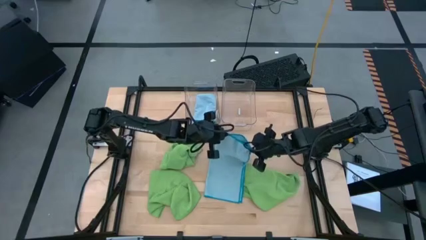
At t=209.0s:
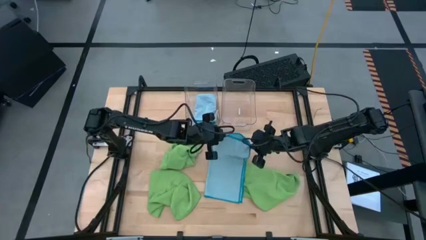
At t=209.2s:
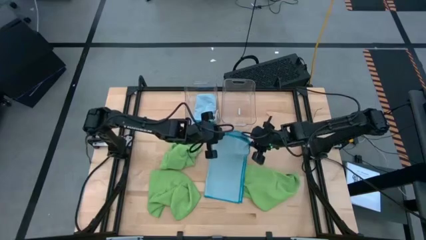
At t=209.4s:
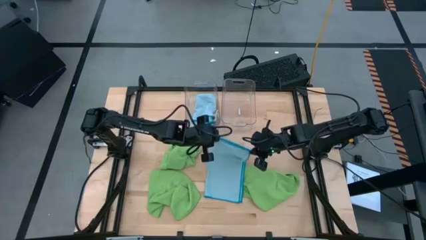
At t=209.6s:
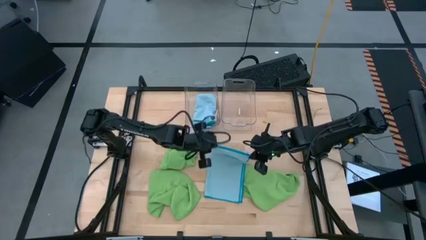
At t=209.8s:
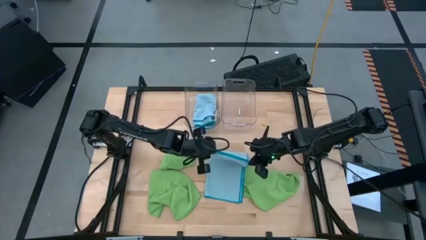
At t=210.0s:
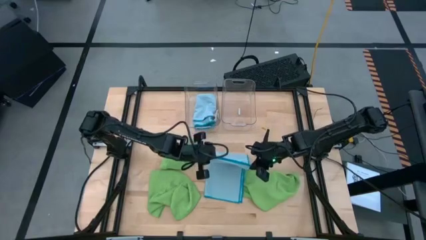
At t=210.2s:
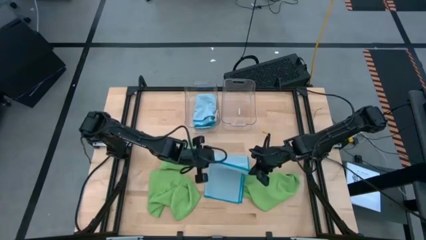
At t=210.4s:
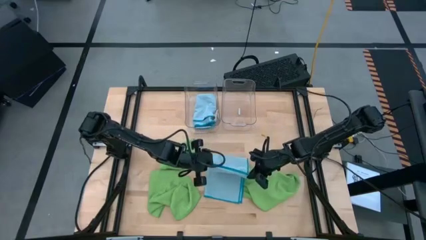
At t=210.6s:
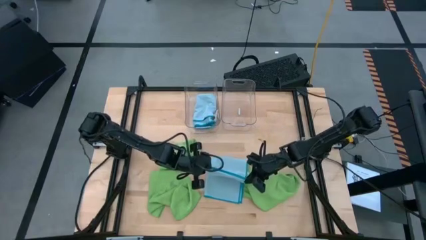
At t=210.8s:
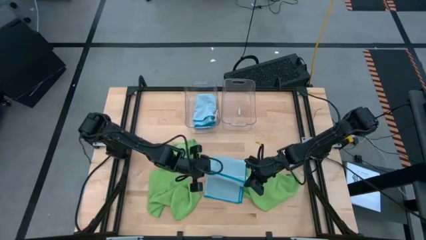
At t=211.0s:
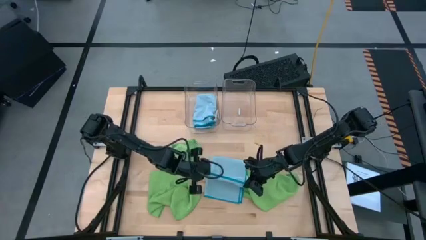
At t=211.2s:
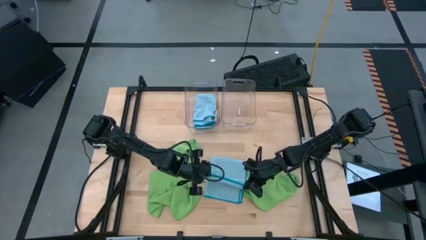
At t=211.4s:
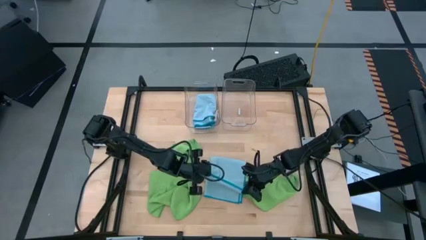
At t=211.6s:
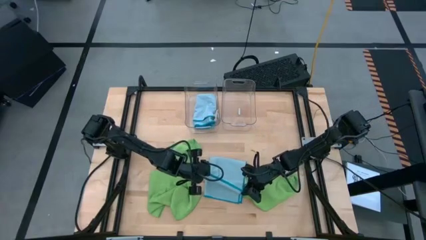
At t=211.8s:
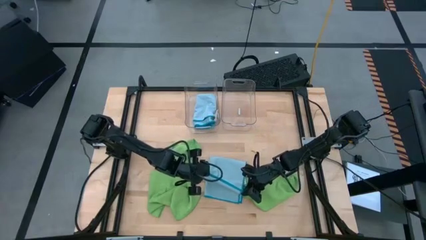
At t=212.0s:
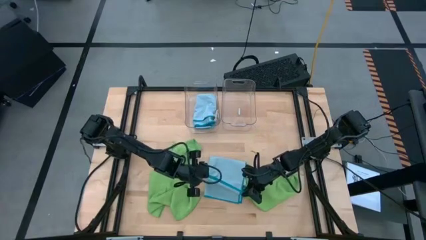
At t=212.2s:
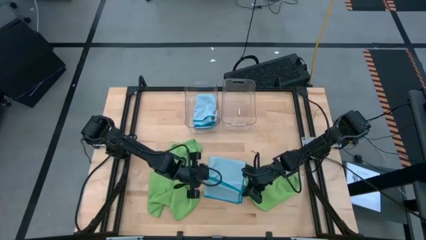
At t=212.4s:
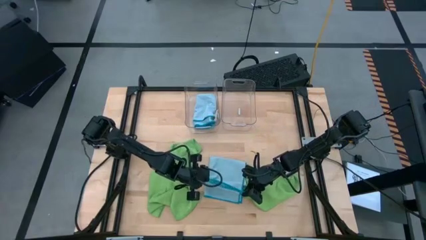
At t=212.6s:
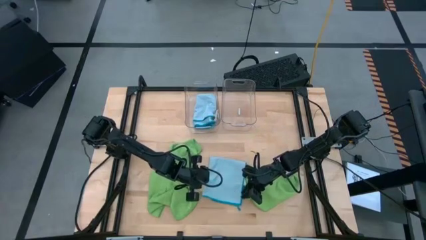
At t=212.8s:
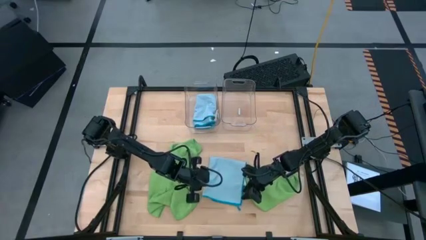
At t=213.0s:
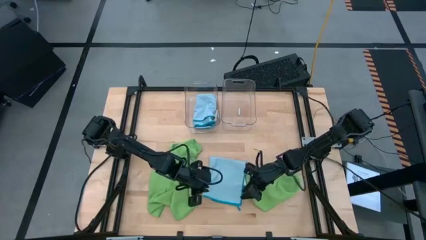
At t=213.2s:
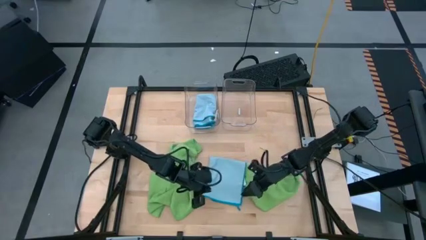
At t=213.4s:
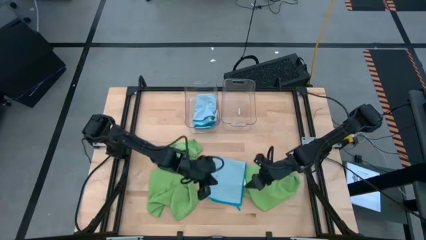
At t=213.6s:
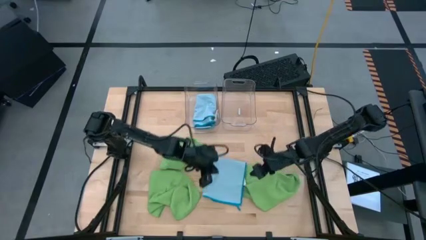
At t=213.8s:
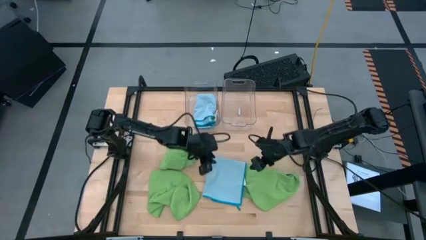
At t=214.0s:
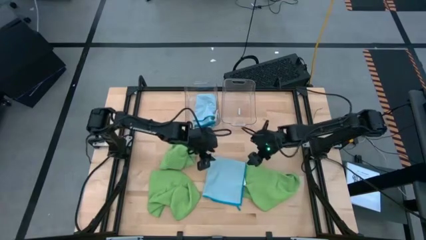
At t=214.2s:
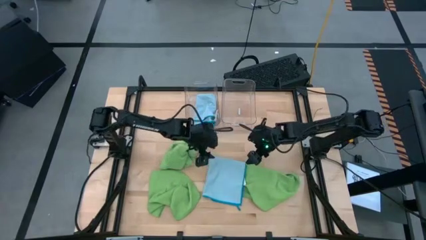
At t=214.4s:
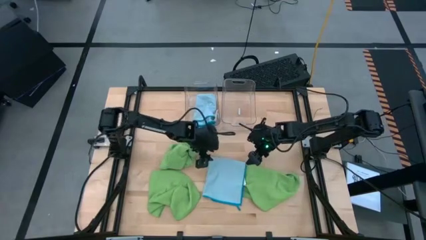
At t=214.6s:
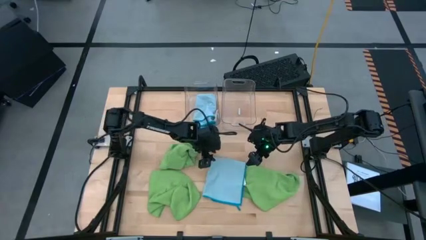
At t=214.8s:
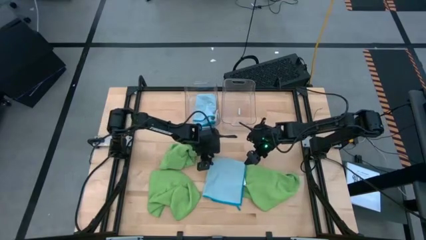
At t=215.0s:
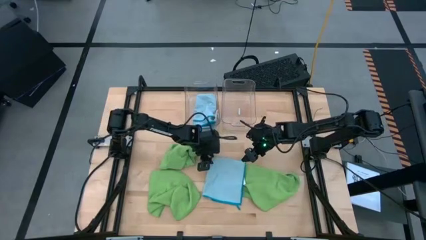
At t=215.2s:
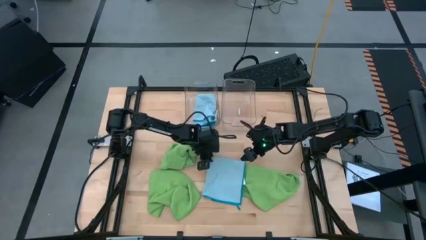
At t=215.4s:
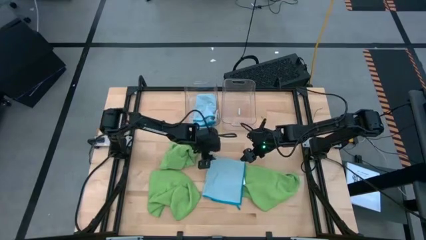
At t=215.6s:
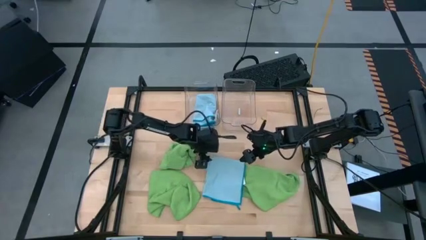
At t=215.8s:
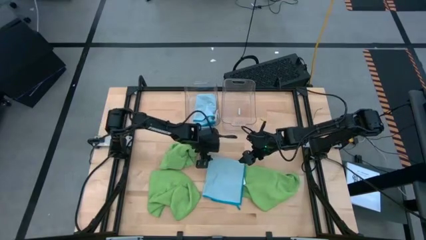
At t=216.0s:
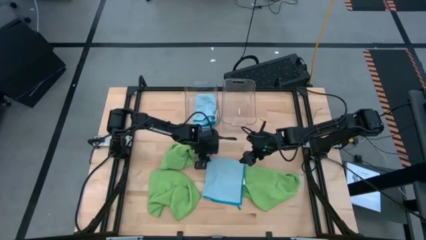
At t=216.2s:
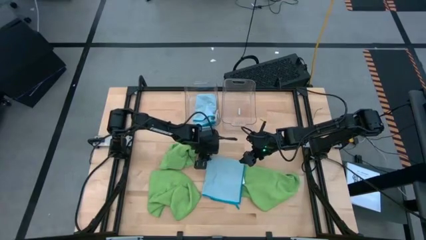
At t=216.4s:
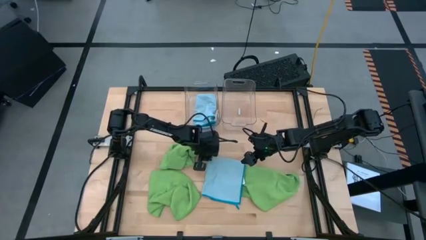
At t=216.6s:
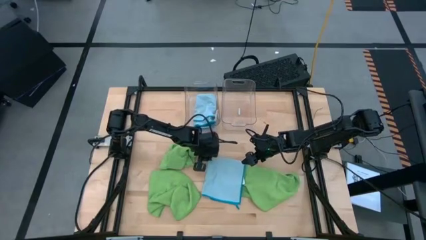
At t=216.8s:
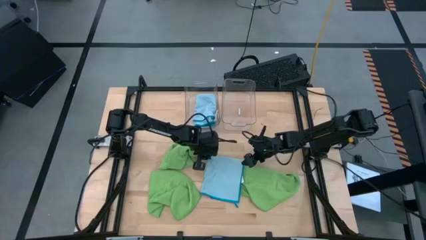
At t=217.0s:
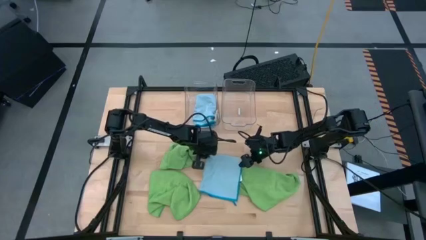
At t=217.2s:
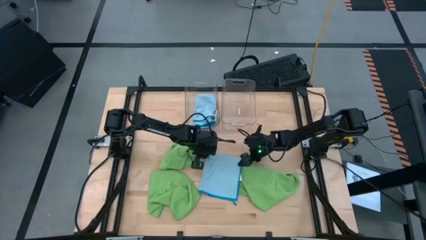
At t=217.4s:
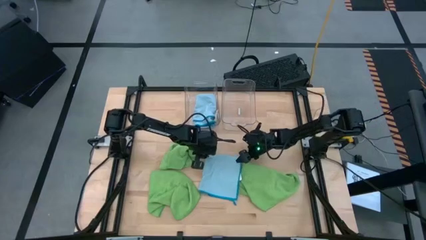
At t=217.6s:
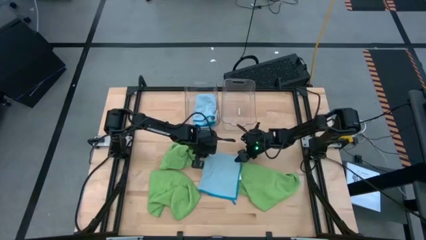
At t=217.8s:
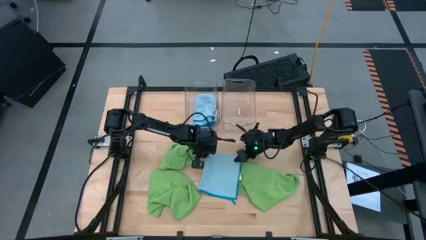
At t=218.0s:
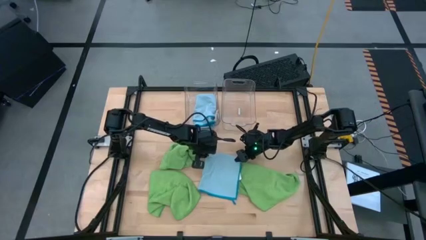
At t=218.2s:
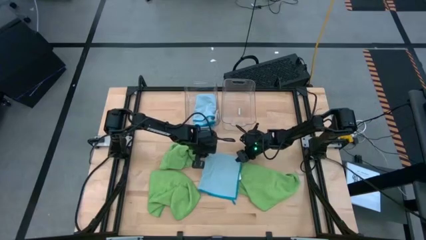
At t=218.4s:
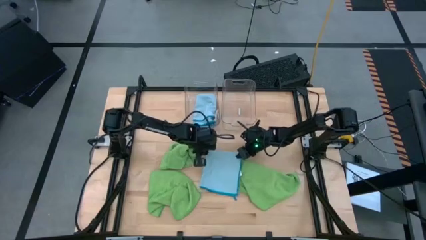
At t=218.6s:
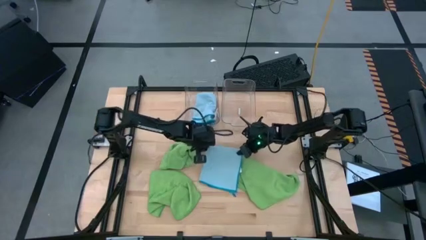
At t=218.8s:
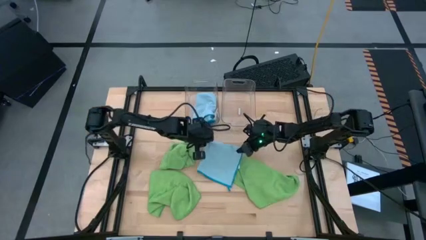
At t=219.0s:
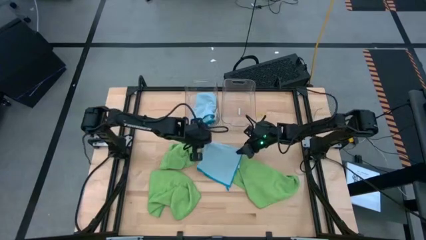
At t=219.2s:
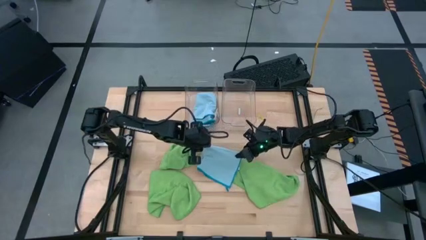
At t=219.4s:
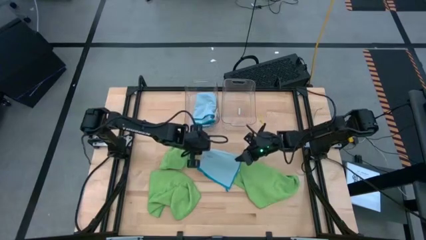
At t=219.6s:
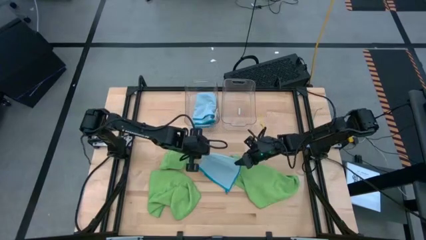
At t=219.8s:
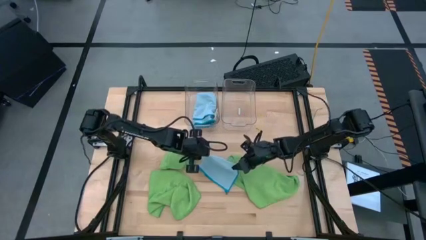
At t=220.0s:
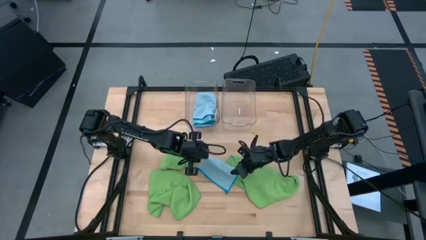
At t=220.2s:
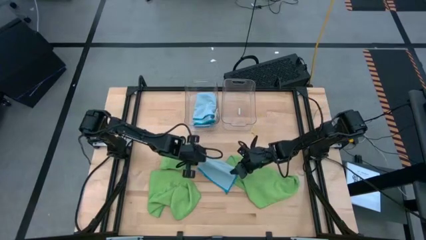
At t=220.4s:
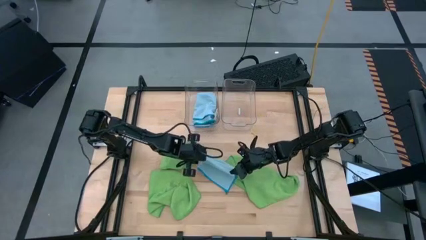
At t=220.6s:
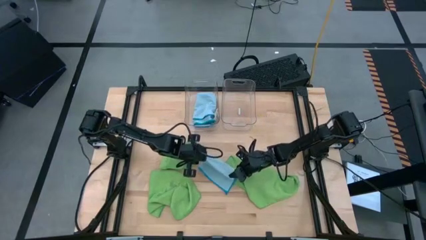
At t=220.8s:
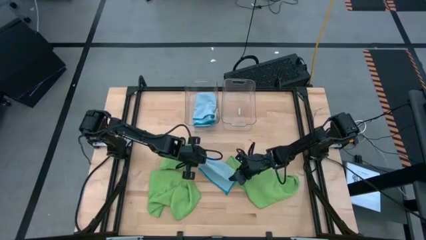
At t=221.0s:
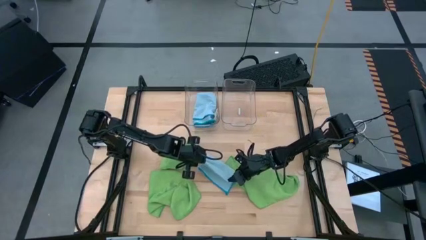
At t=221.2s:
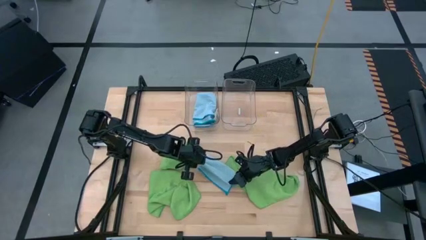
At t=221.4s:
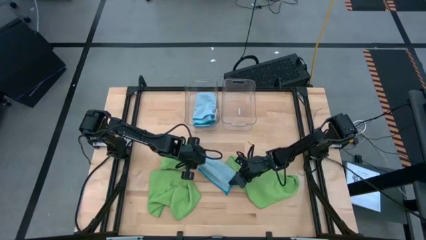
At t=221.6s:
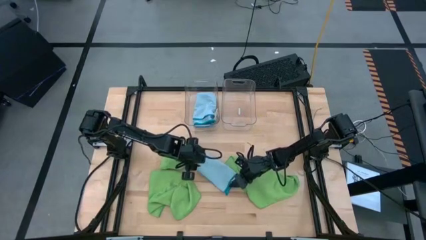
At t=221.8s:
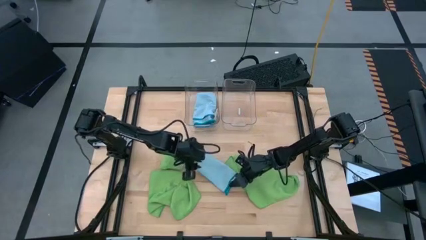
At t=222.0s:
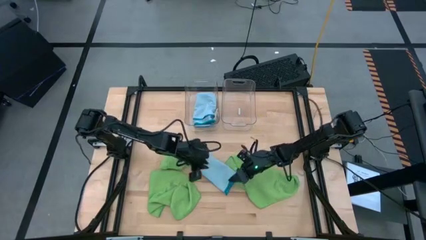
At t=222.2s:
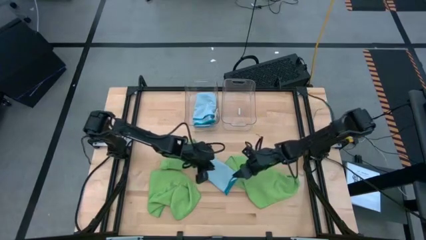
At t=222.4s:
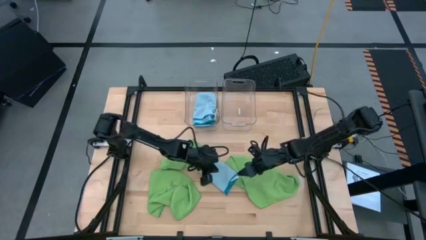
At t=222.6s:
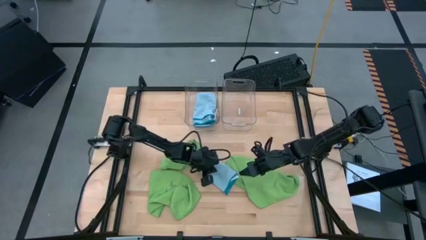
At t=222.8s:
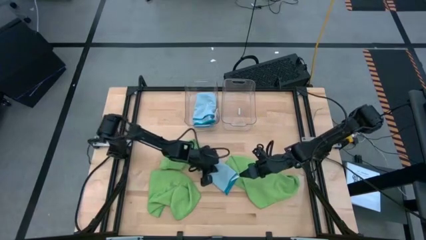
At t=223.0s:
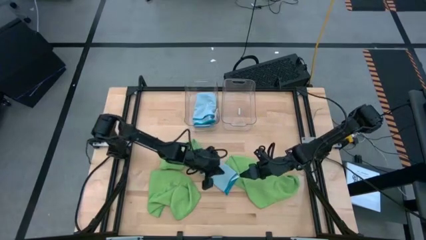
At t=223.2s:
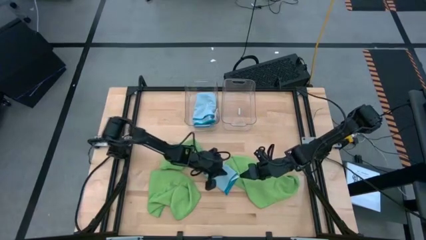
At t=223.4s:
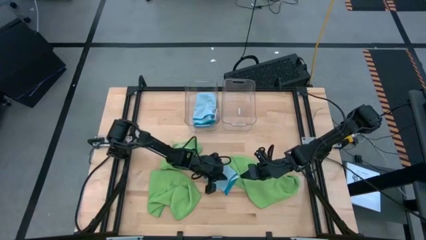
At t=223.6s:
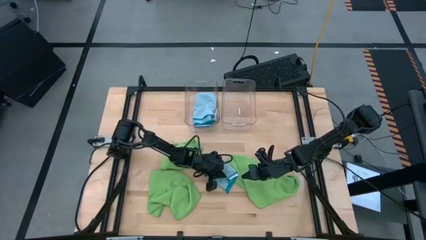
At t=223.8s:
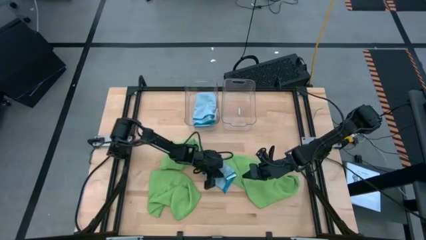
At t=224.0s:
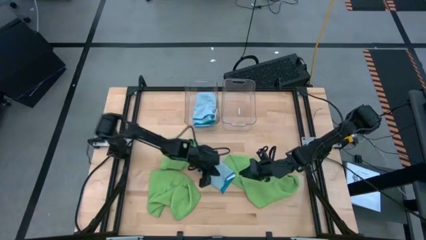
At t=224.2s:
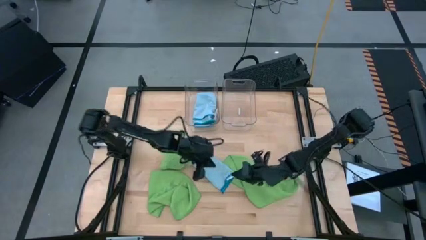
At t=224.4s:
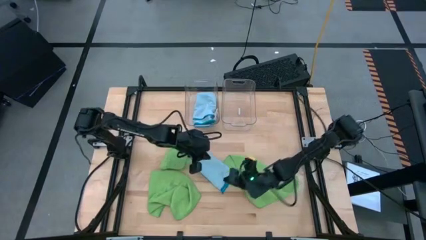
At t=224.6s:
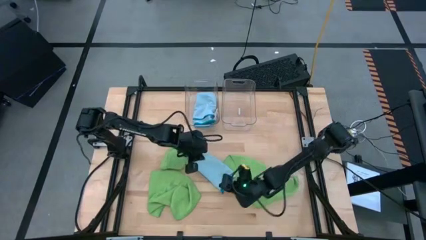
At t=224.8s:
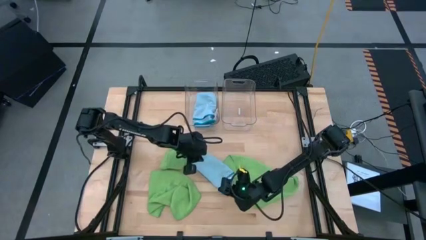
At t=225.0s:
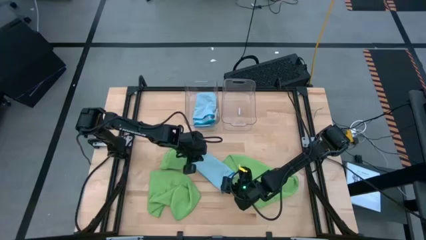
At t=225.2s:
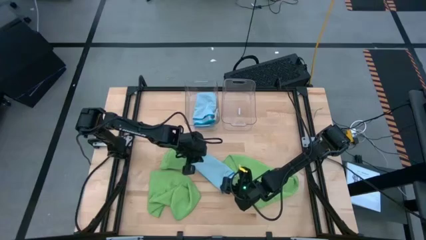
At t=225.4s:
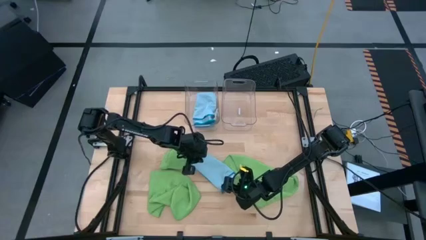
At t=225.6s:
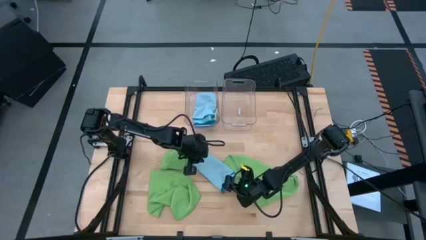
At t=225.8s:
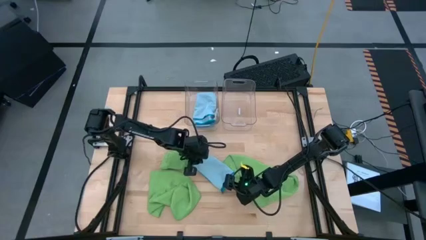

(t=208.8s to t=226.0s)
Task: Fold microfiber towels
Fold the blue microfiber towel
